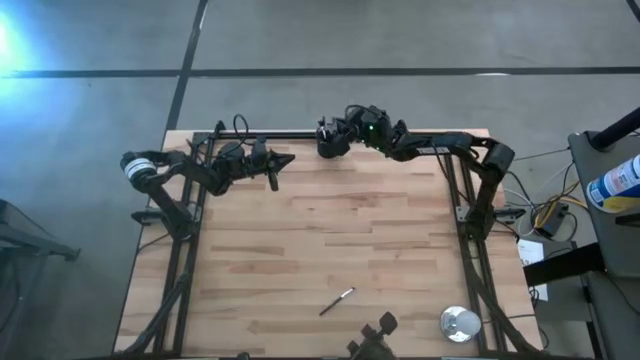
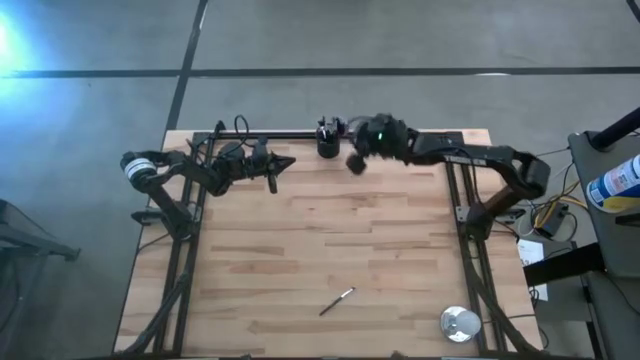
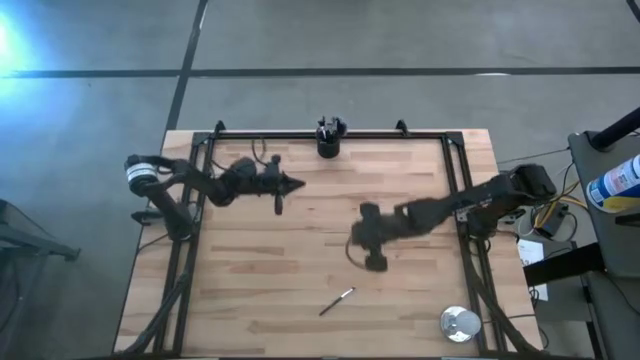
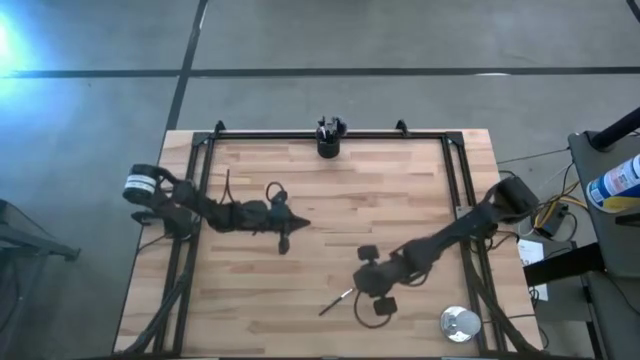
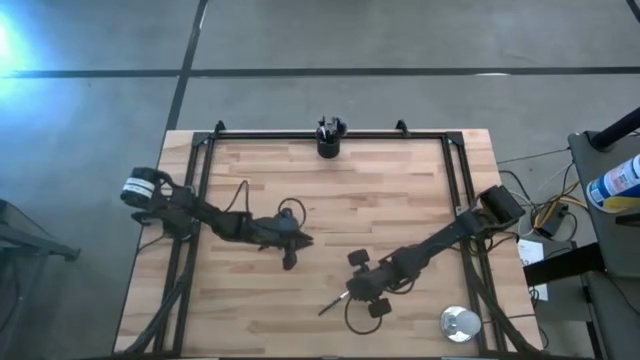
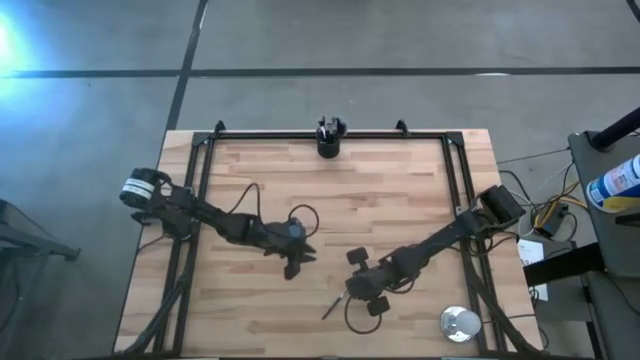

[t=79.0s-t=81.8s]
Task: Put items in baskets/containers
Put the black eyeshadow brush into the black pen holder

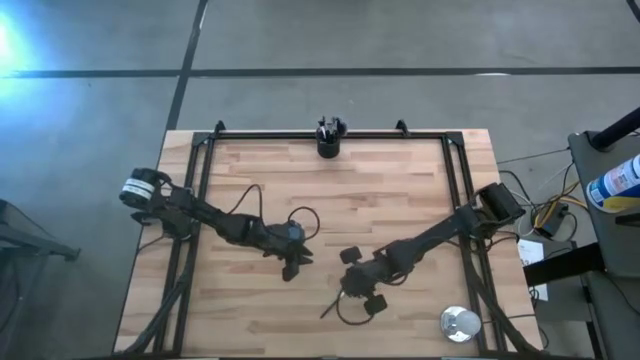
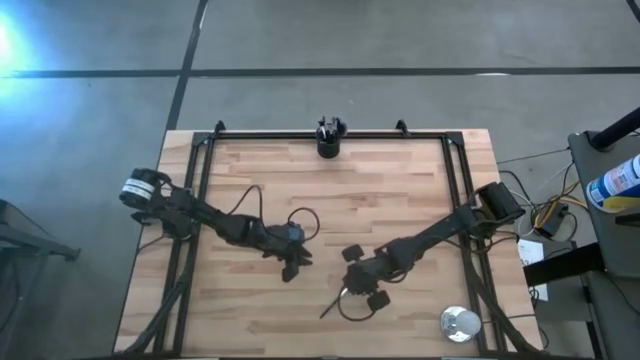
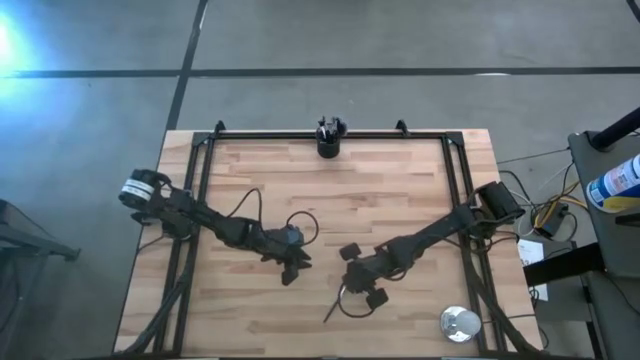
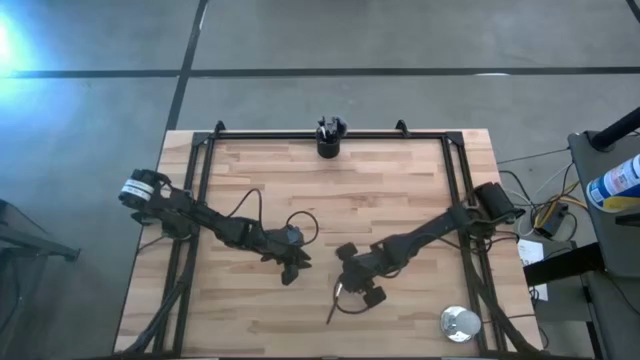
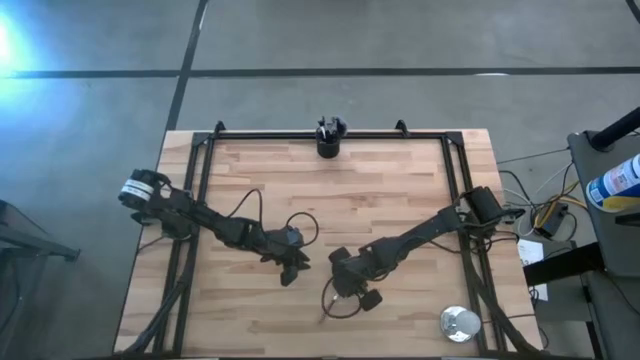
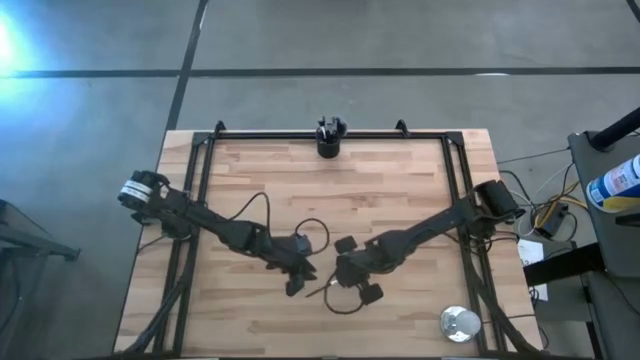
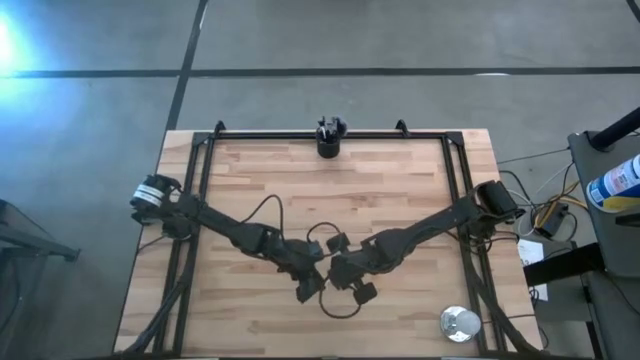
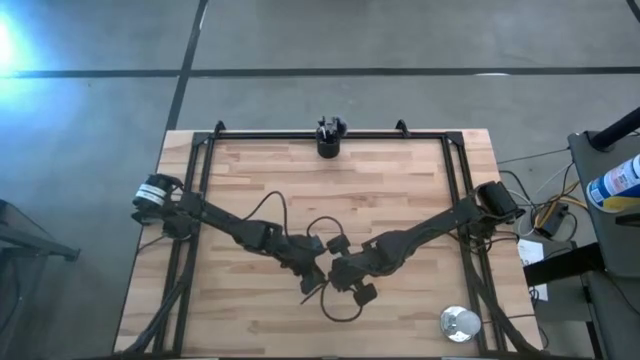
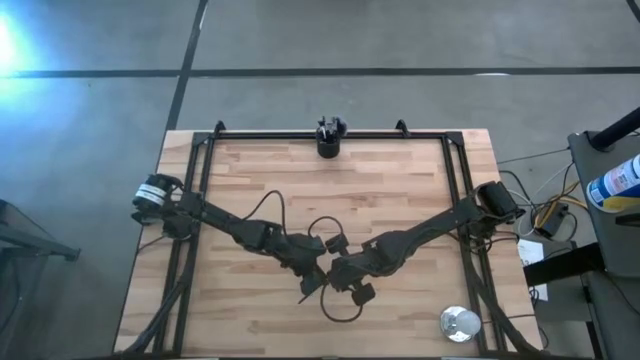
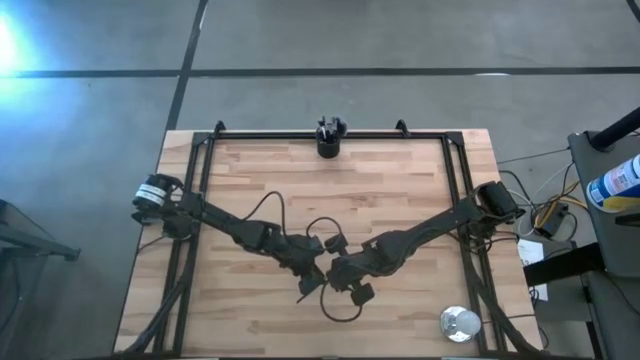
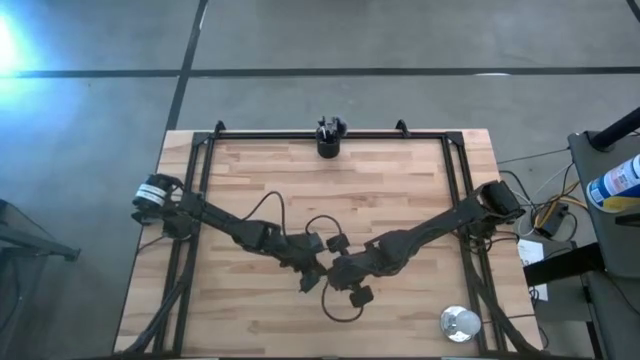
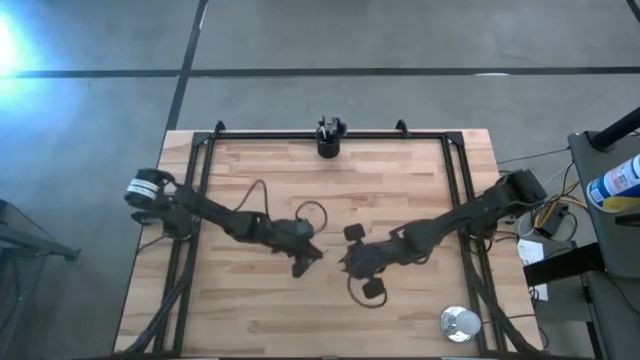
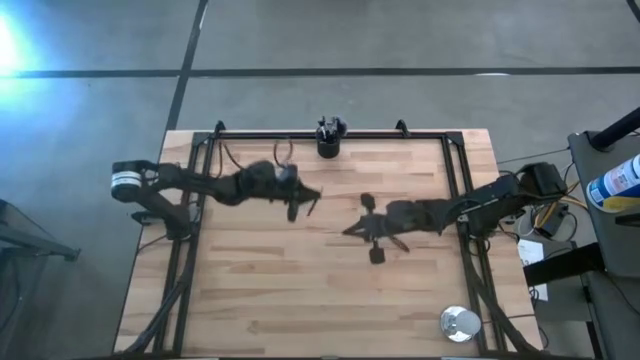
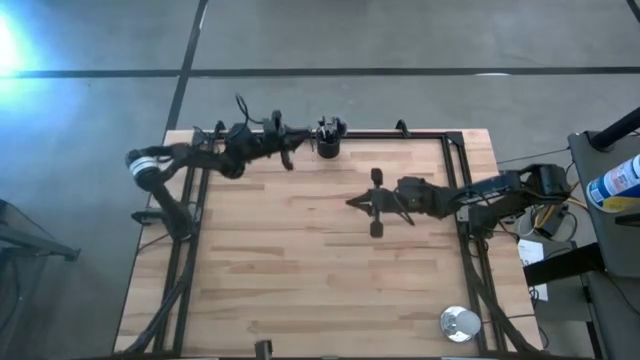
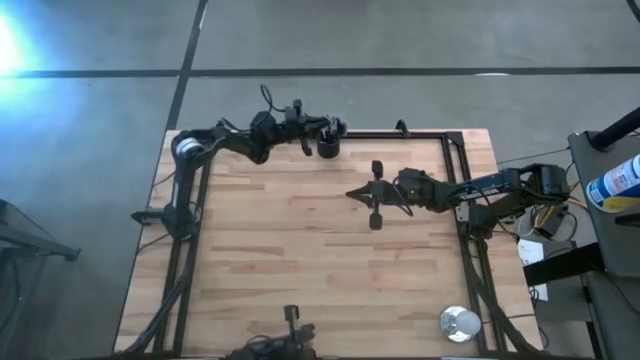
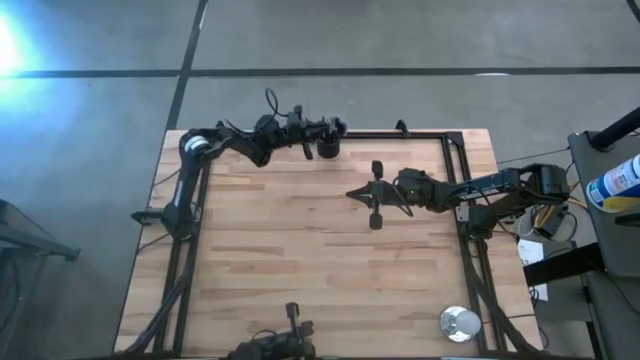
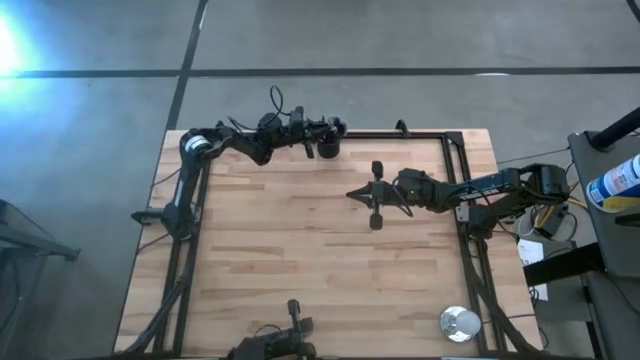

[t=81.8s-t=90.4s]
Put the black eyeshadow brush into the black pen holder

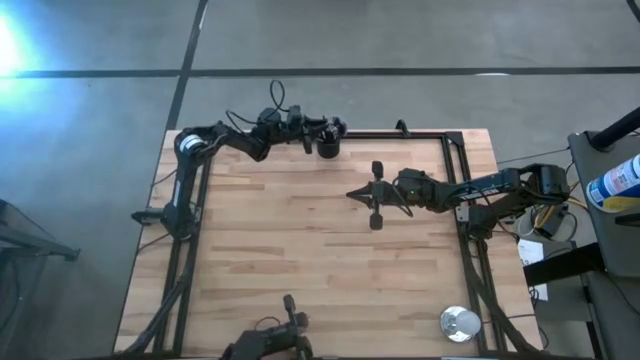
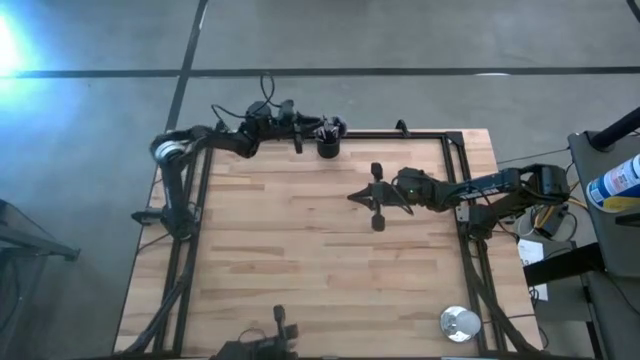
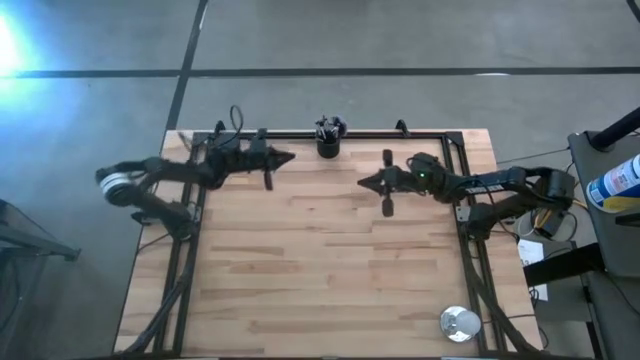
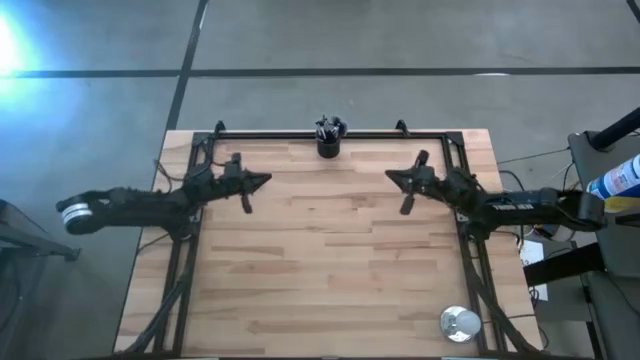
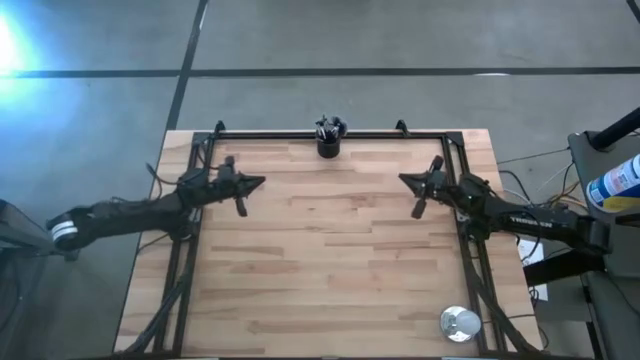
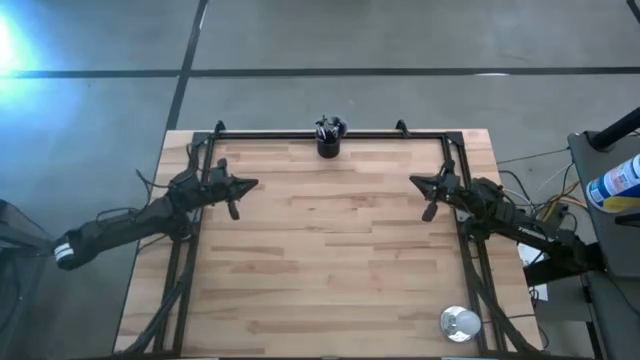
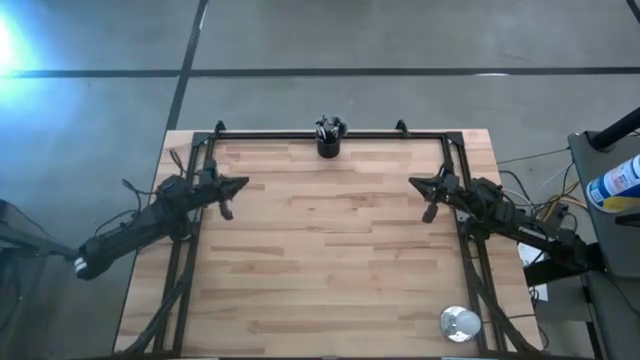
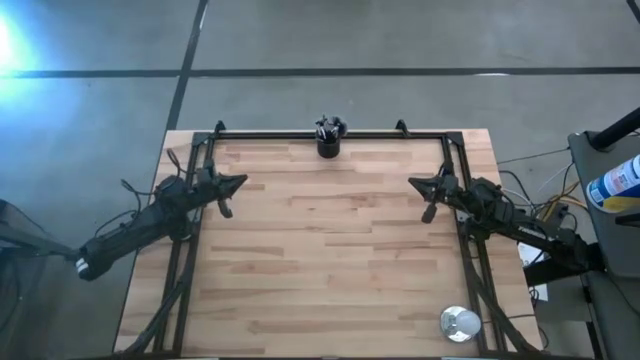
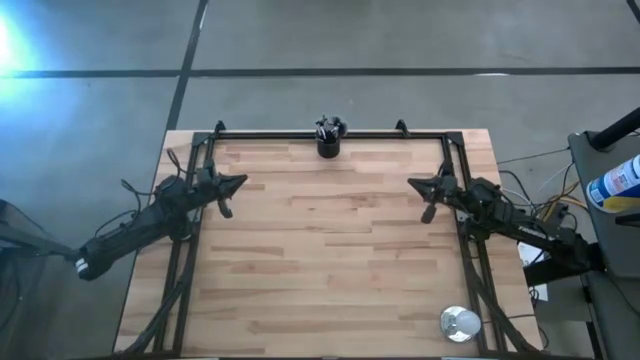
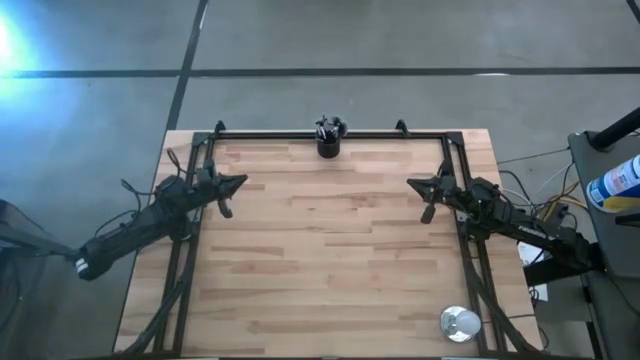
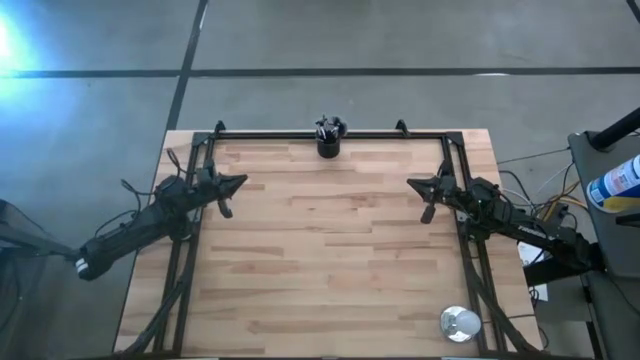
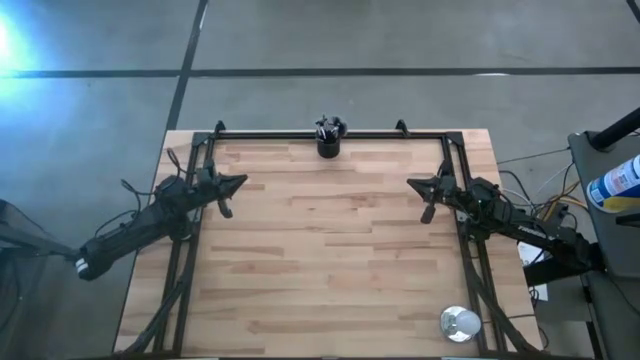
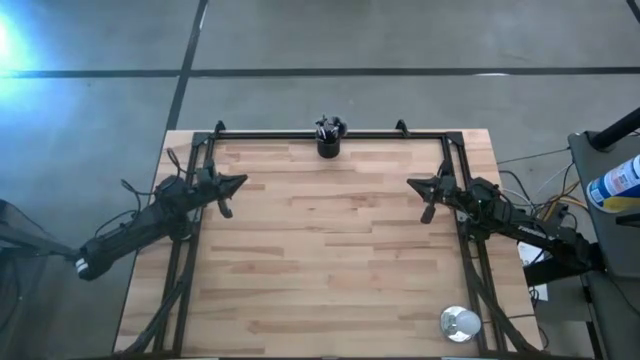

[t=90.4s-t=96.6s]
Return to Home Position

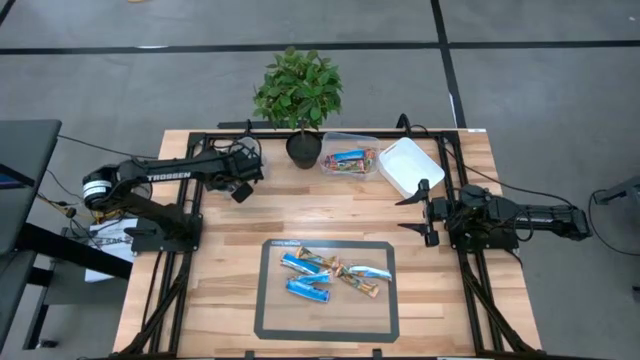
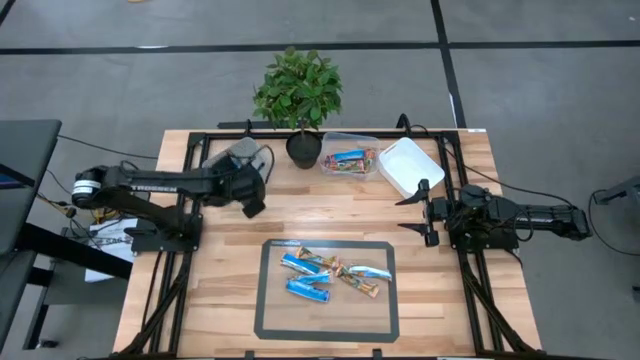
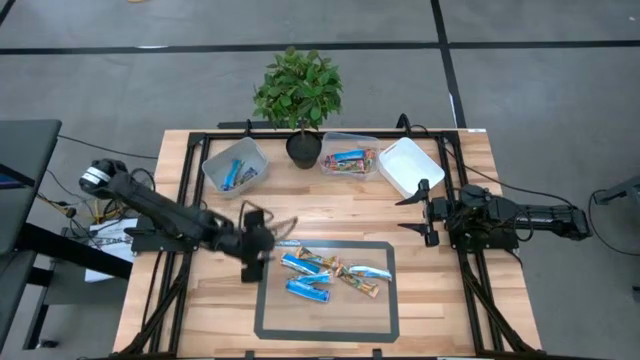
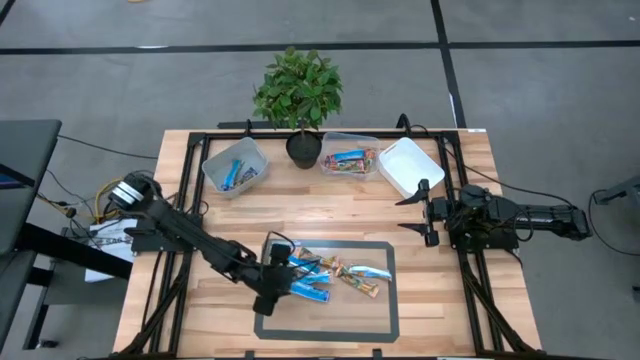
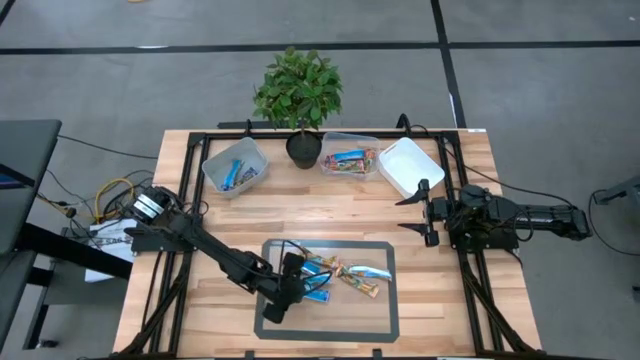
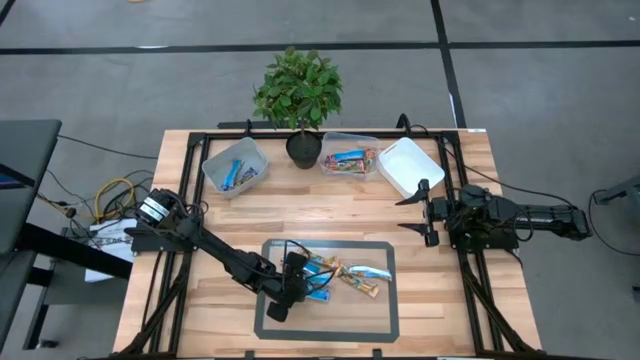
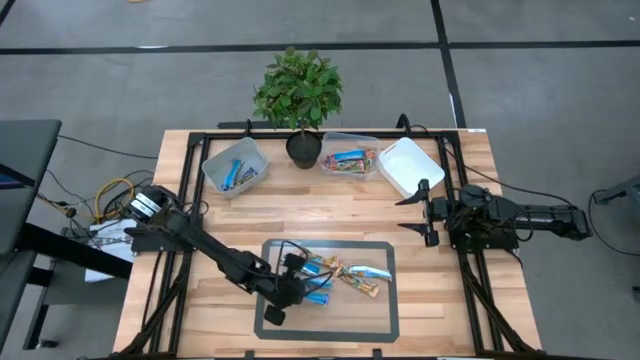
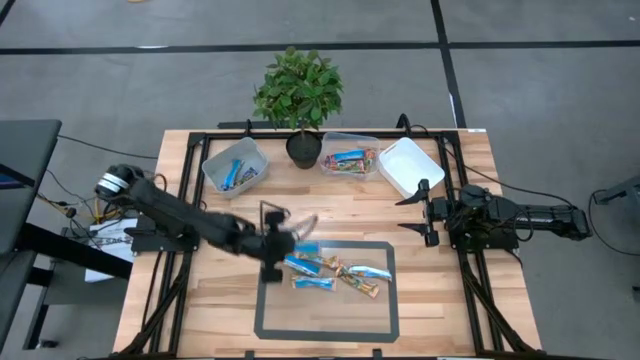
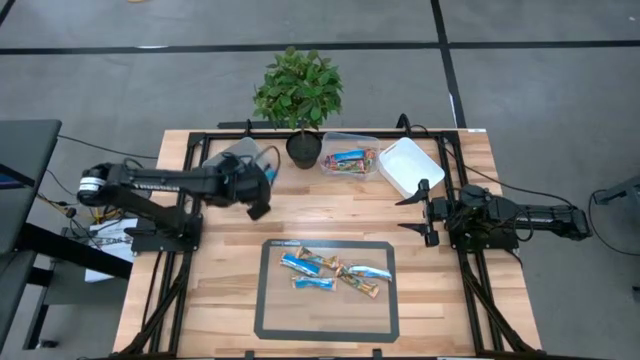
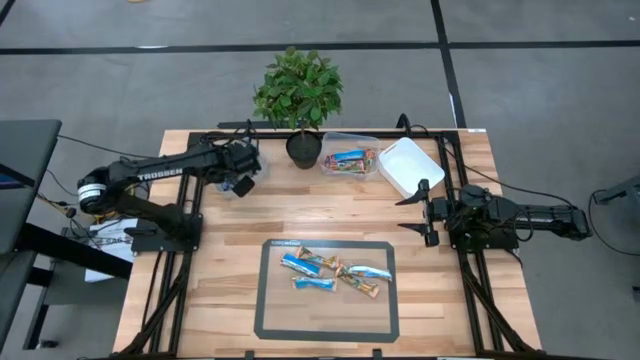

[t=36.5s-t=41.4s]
Task: Pick and place Granola Bars by type
Put the blue granola bar into the gray bin
